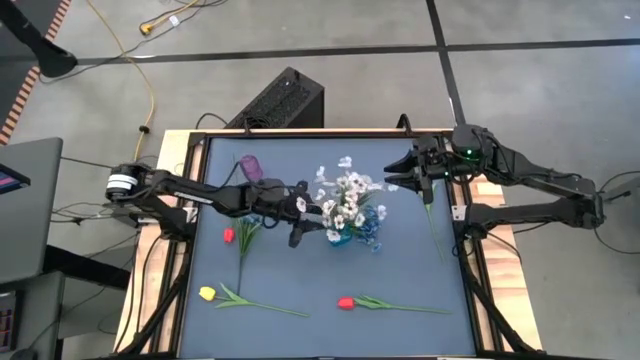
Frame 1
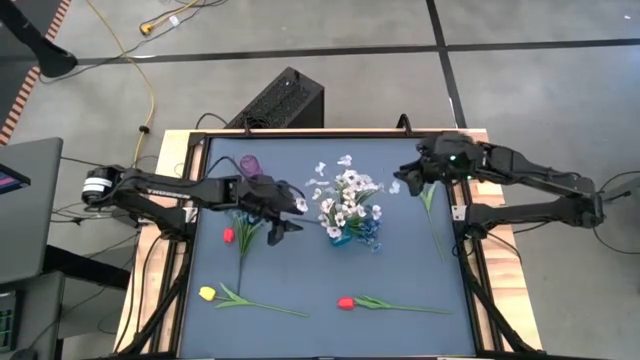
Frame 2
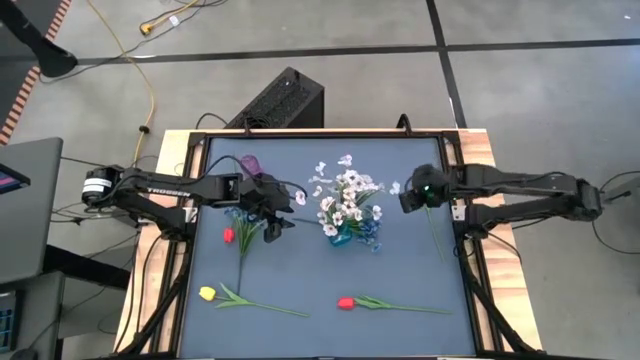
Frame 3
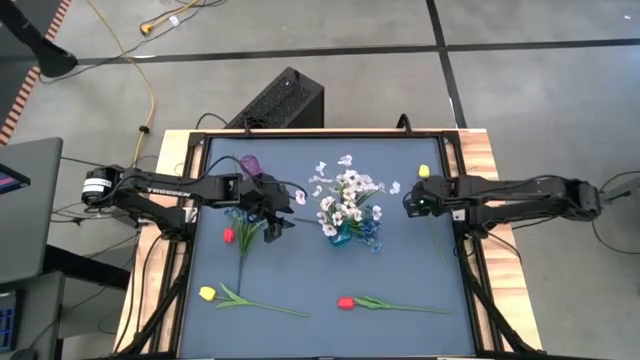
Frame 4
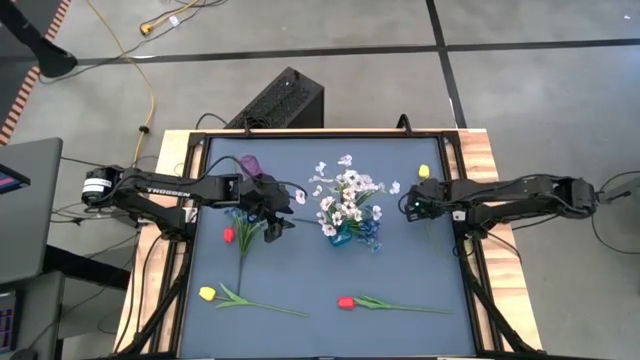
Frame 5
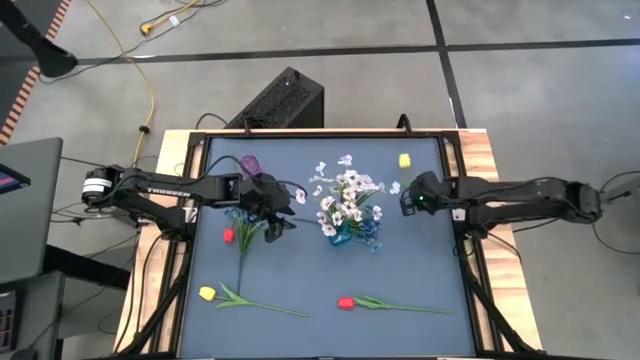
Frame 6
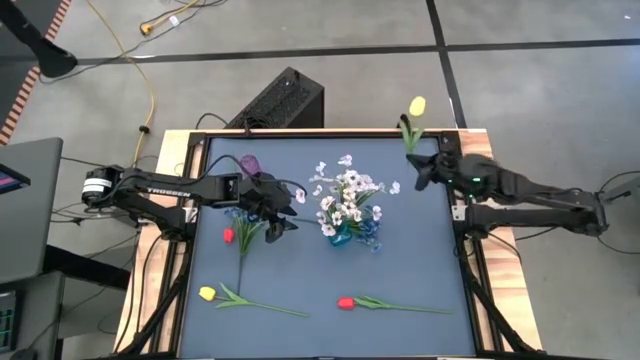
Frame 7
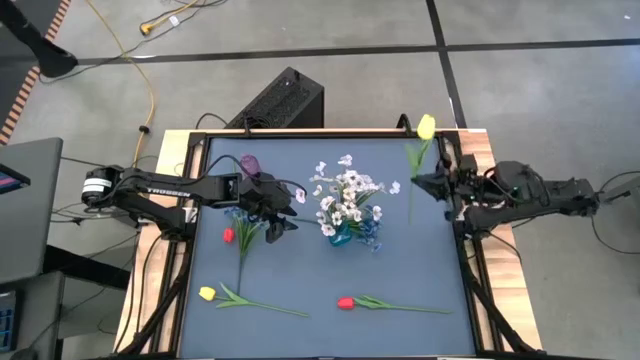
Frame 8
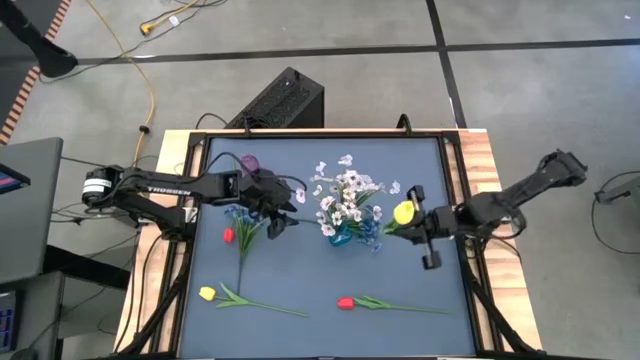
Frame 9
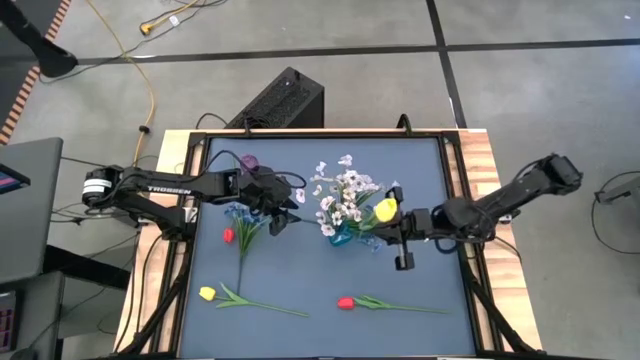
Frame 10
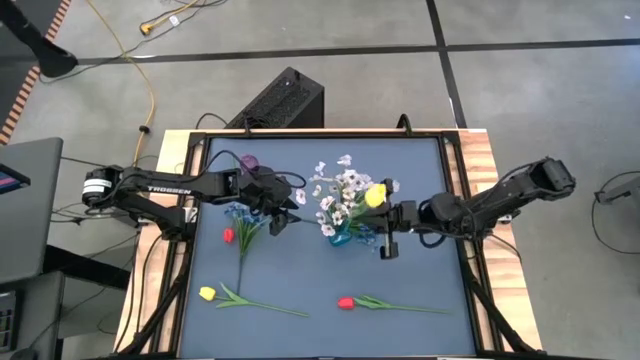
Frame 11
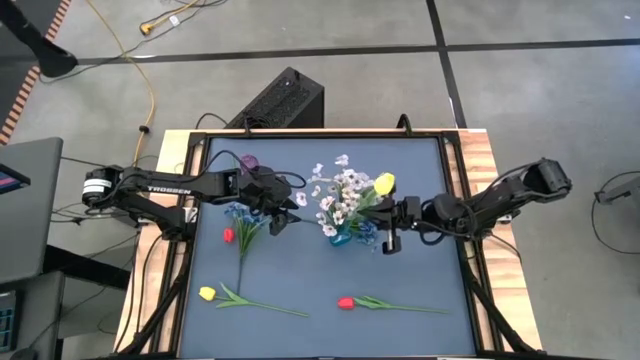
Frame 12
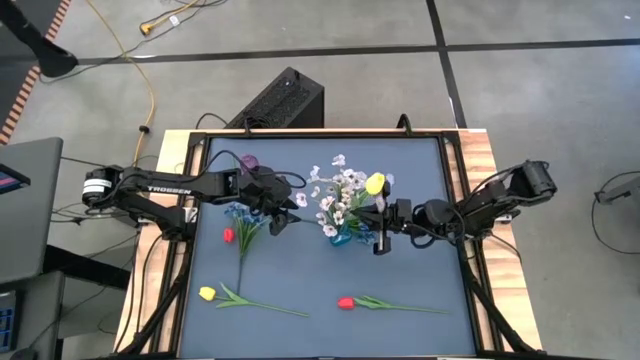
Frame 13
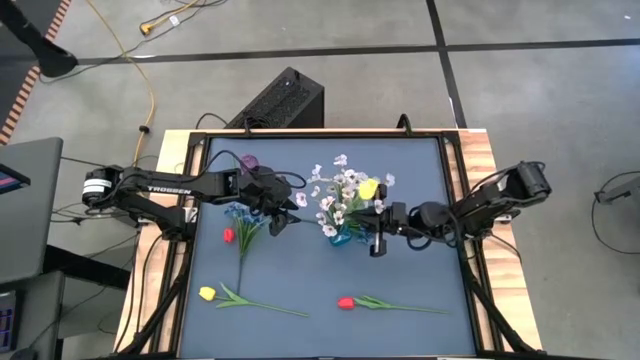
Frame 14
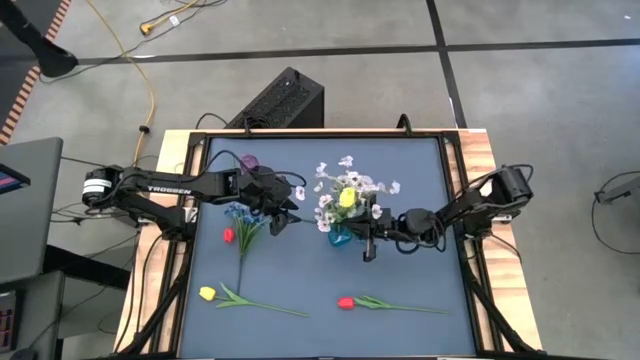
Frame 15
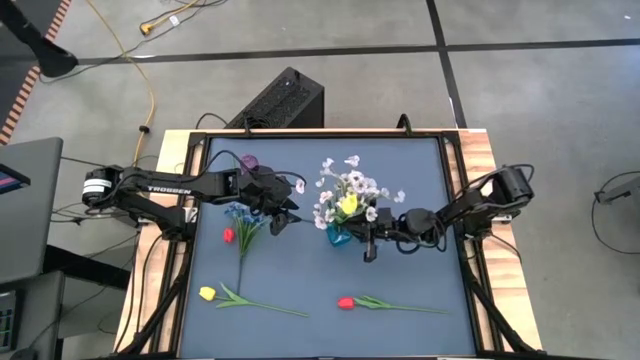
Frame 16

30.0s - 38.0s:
Task: Sort flowers into vase by color
Put the right yellow flower into the blue vase

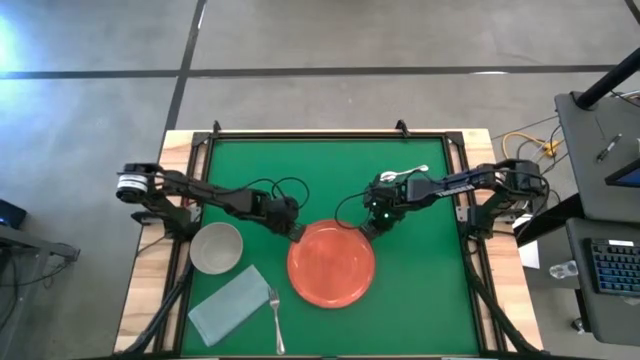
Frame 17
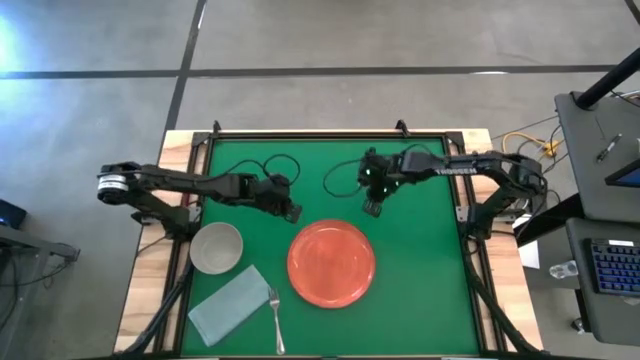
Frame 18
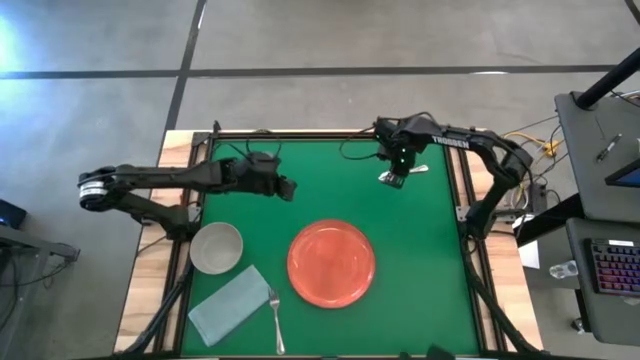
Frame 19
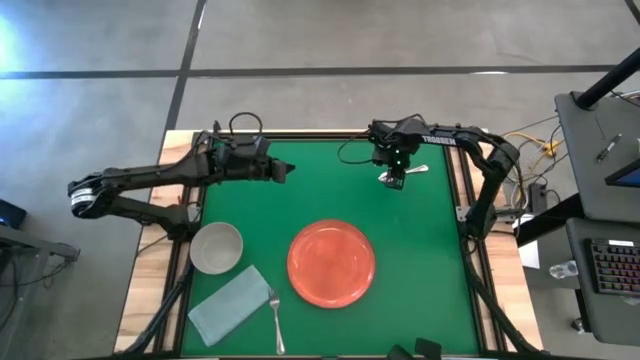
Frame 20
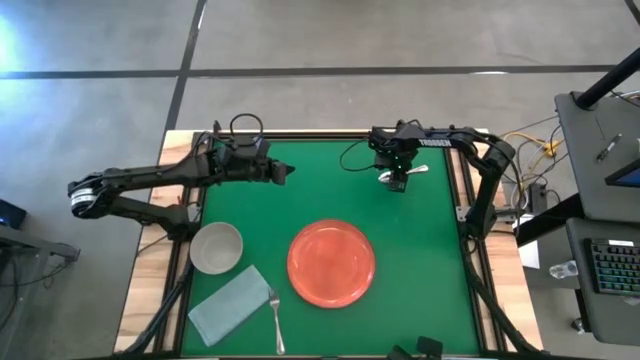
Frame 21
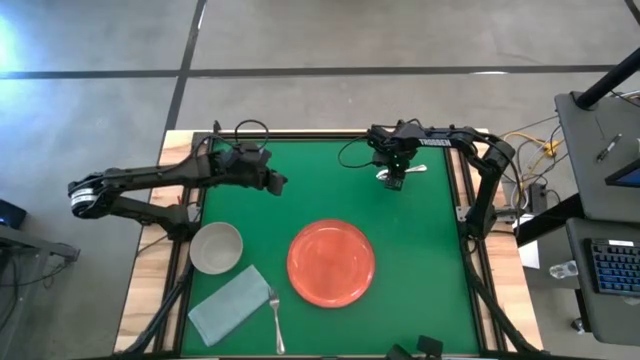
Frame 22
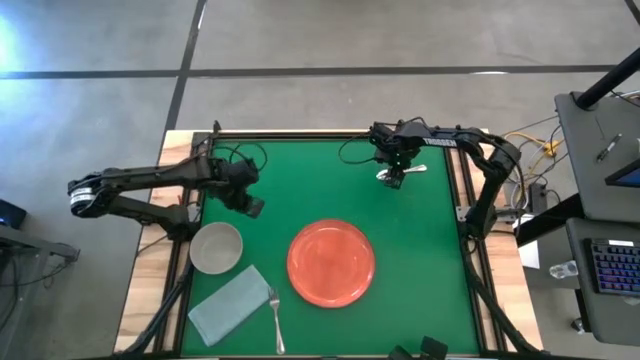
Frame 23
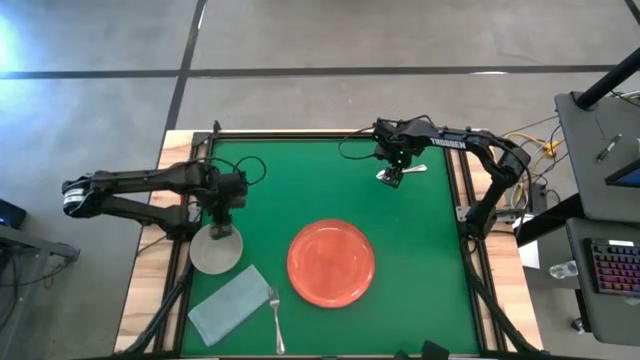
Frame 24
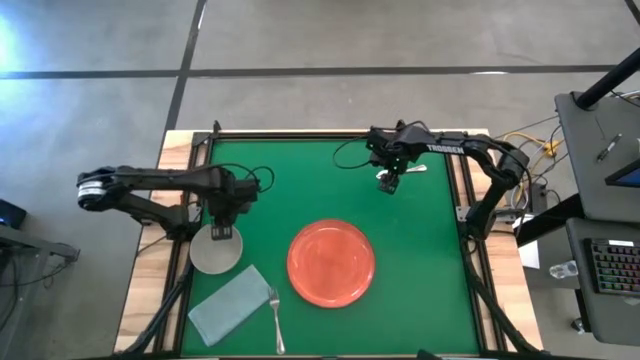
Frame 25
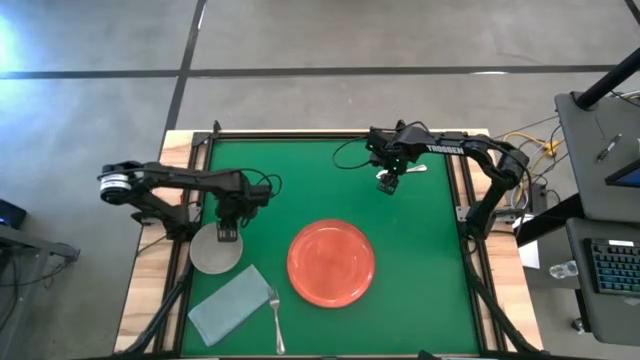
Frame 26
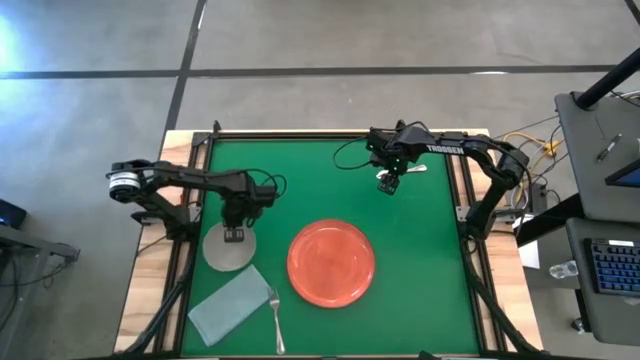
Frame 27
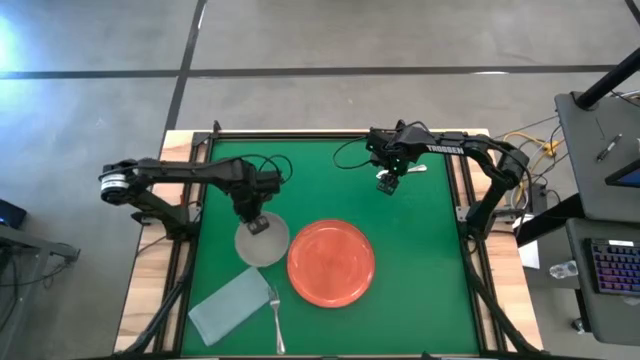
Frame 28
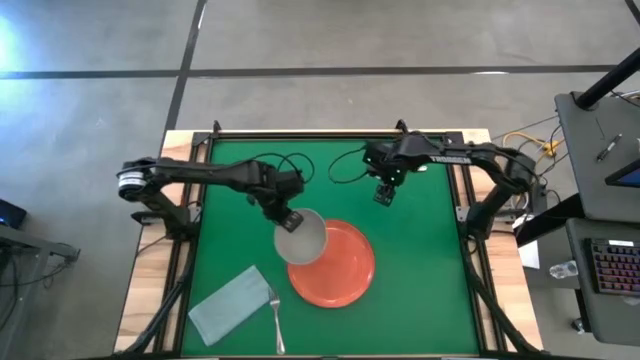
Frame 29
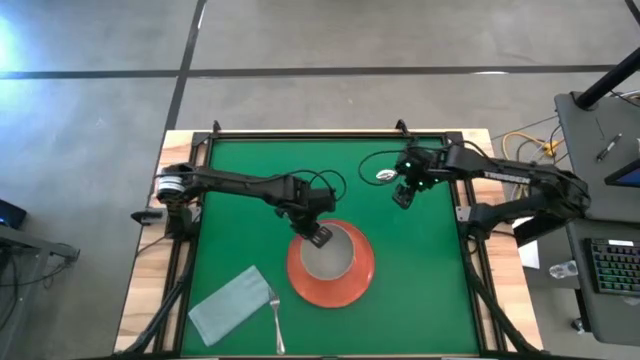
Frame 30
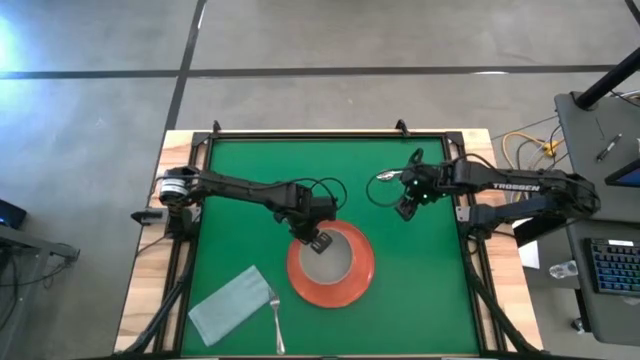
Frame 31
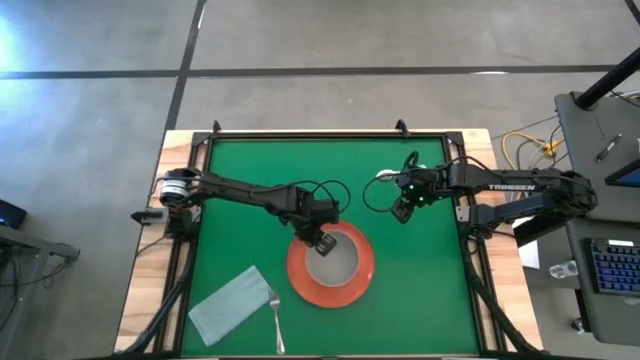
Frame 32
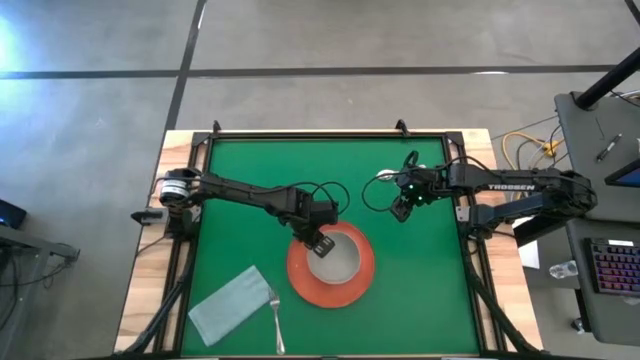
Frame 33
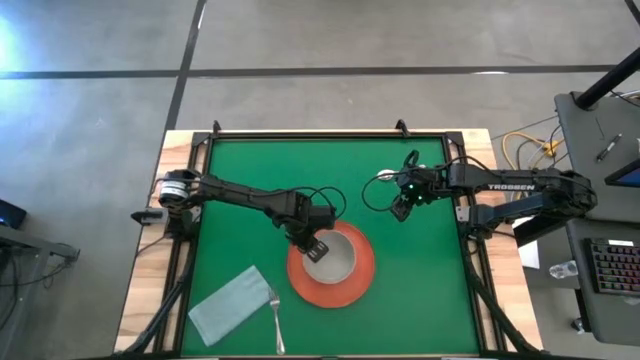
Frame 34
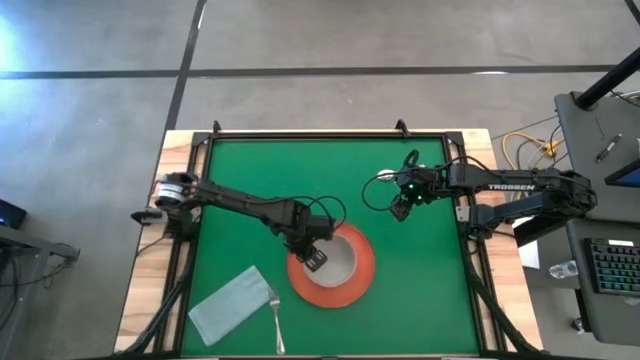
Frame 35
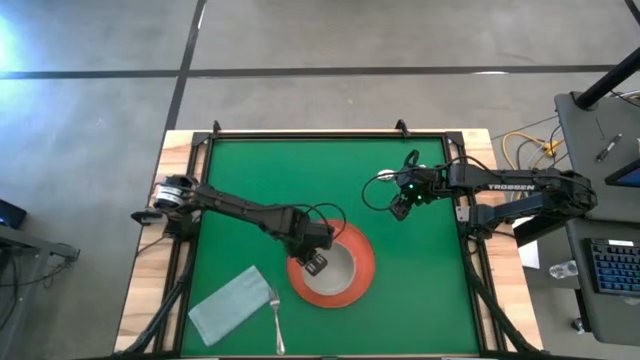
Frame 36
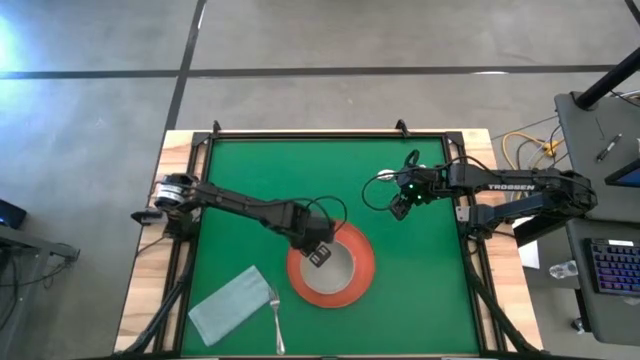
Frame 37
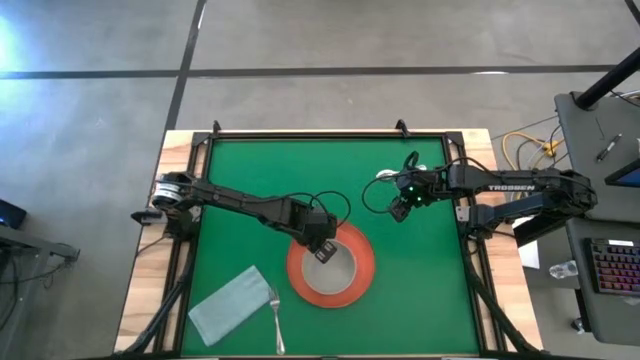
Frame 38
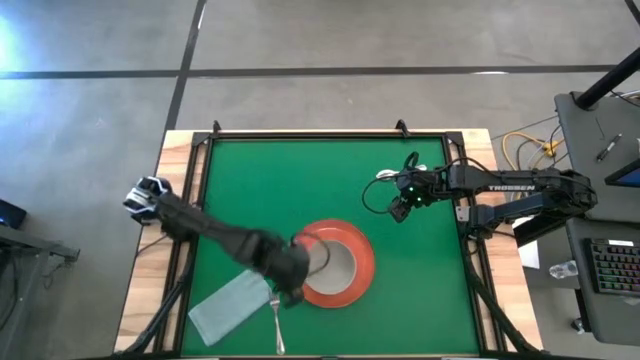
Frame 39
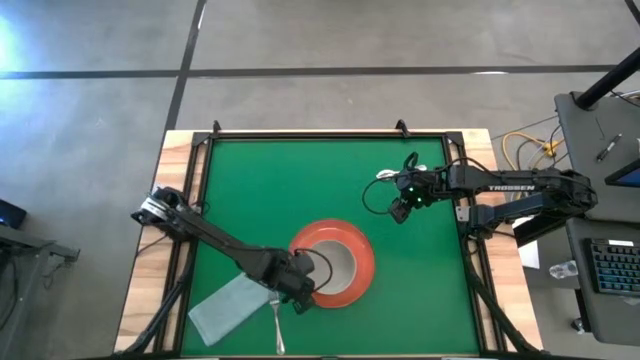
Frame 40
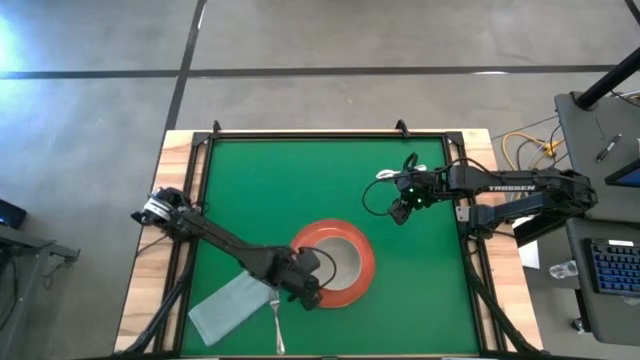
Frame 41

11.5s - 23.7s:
Task: Set table place
Put the gray bowl on top of the orange plate
